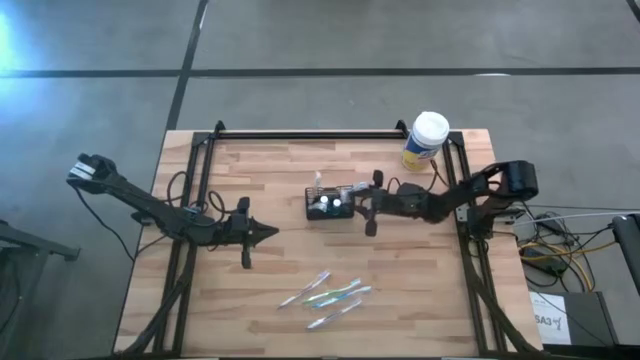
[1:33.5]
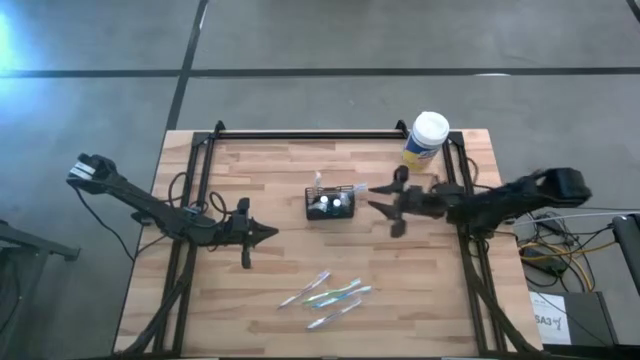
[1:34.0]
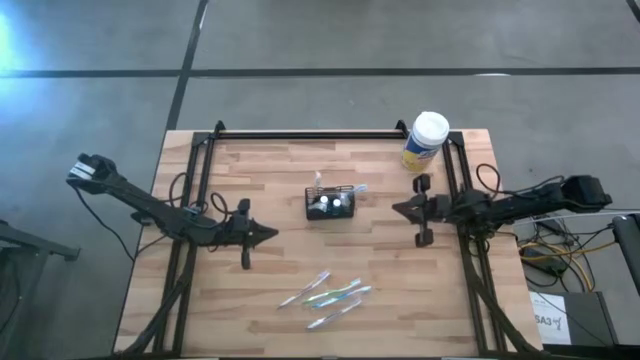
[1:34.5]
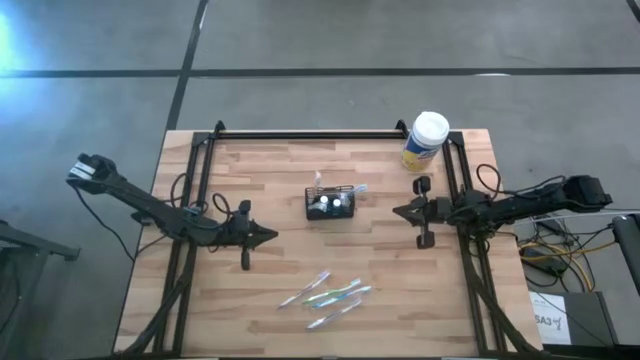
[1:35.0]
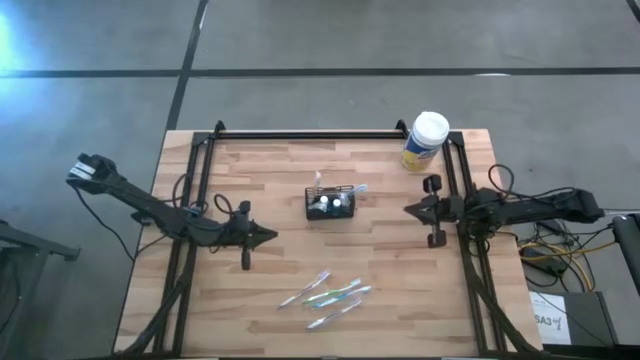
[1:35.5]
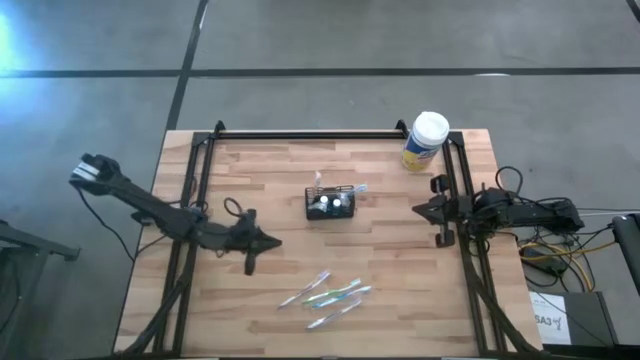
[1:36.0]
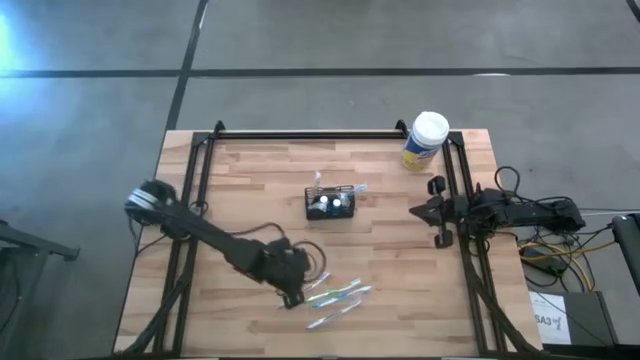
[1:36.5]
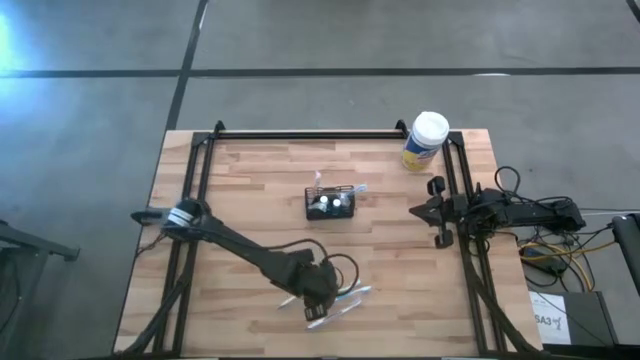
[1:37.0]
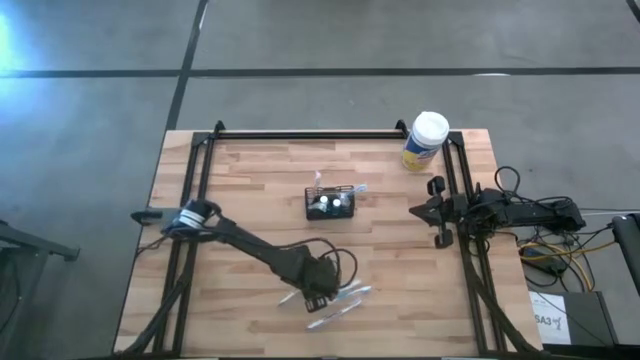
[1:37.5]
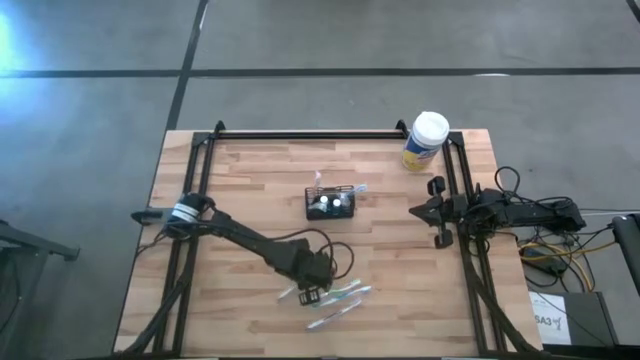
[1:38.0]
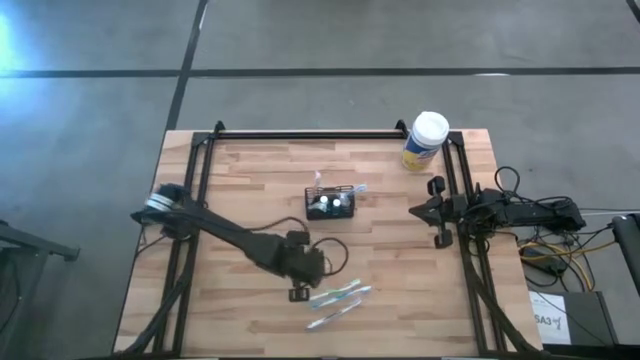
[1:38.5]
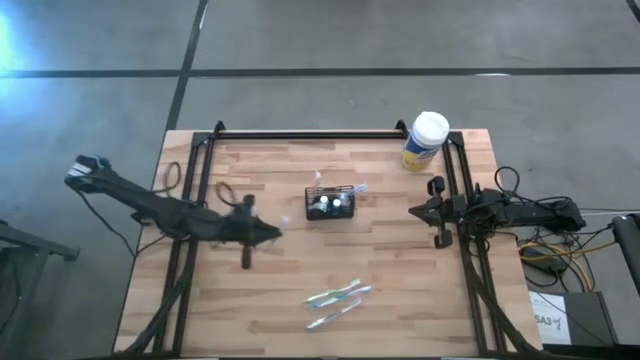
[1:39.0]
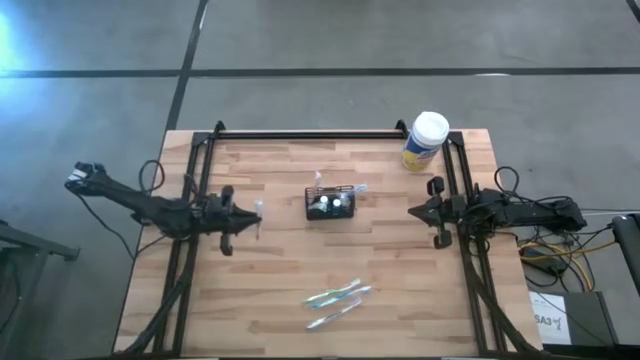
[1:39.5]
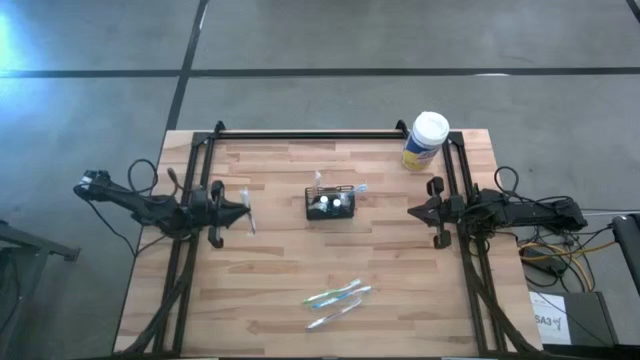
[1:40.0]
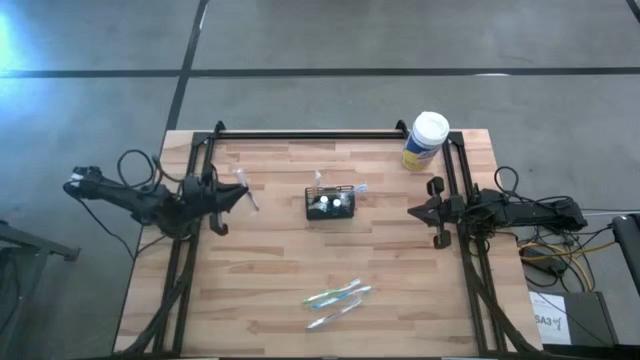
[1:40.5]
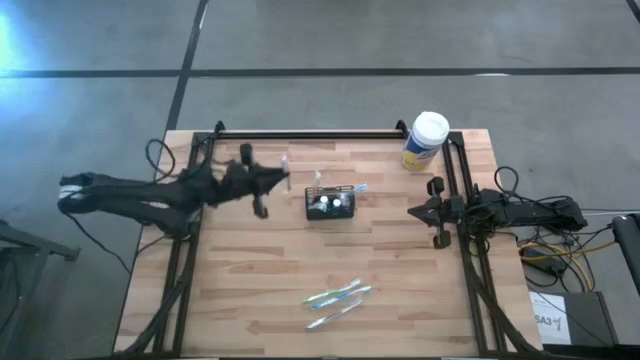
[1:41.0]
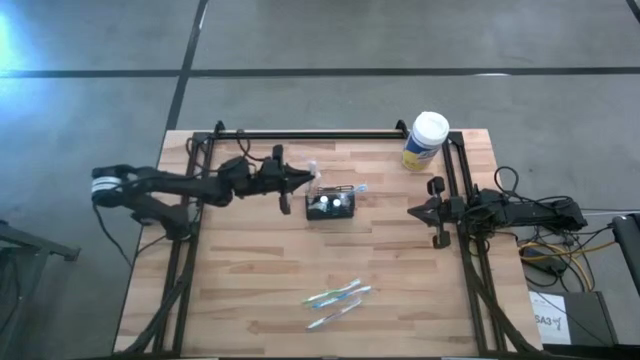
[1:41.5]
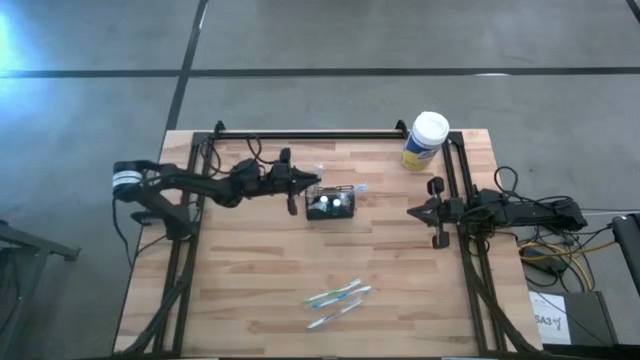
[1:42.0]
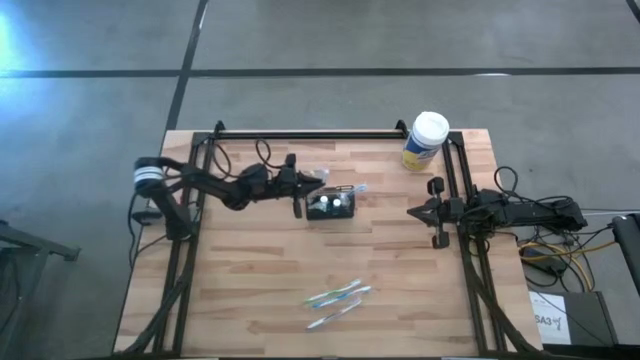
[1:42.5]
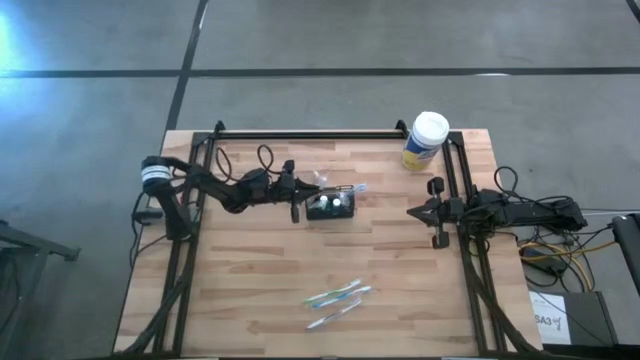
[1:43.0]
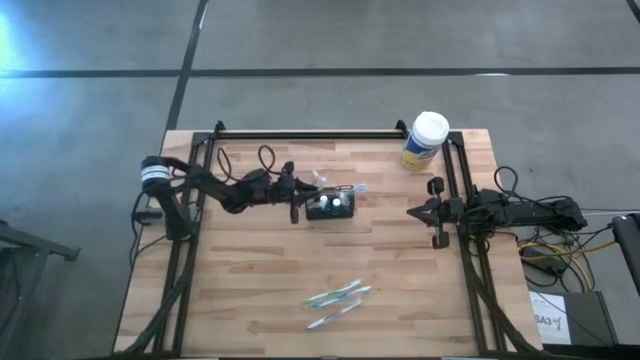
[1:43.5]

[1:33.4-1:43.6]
Task: Pick & Place toothbrushing station
Put the top violet toothbrush in the wire organizer

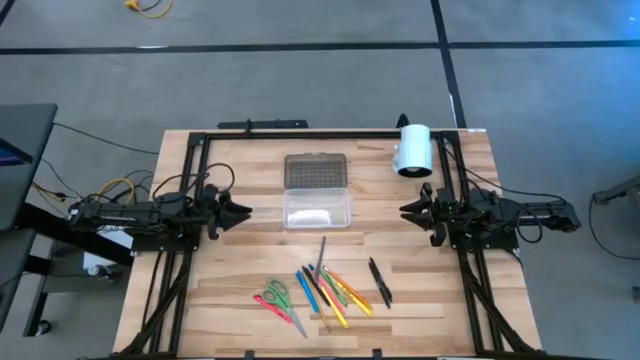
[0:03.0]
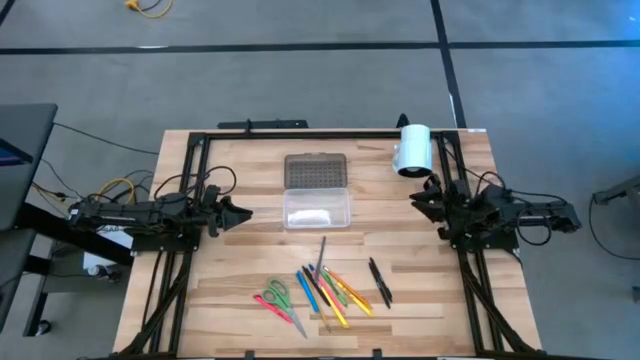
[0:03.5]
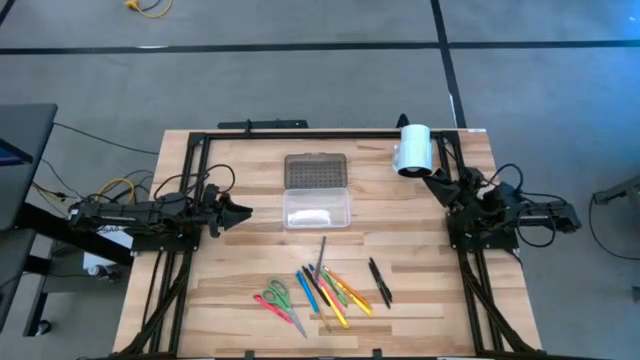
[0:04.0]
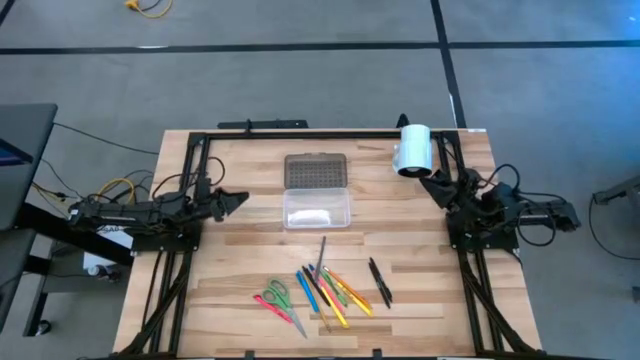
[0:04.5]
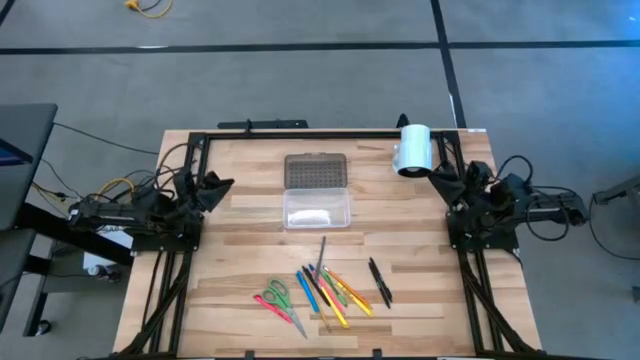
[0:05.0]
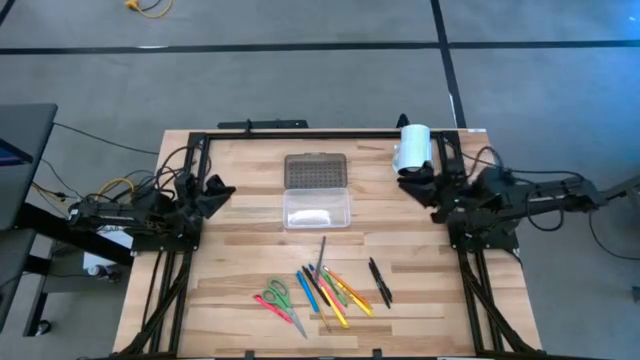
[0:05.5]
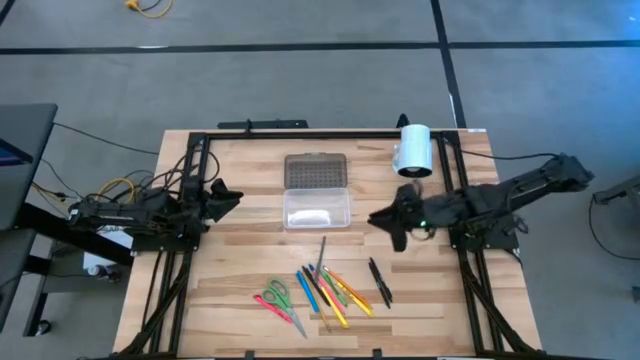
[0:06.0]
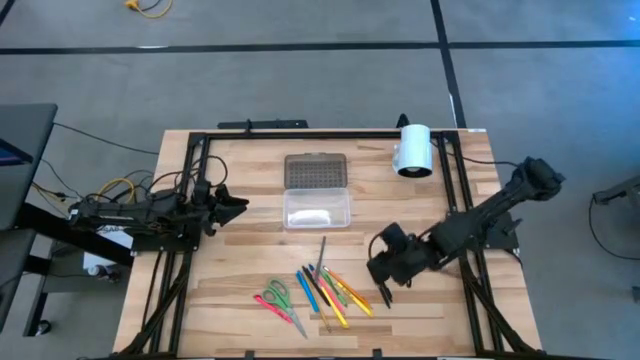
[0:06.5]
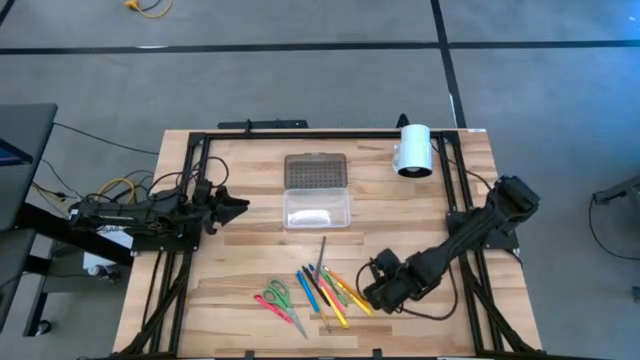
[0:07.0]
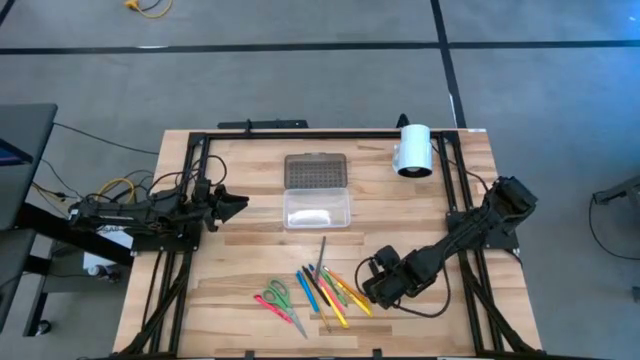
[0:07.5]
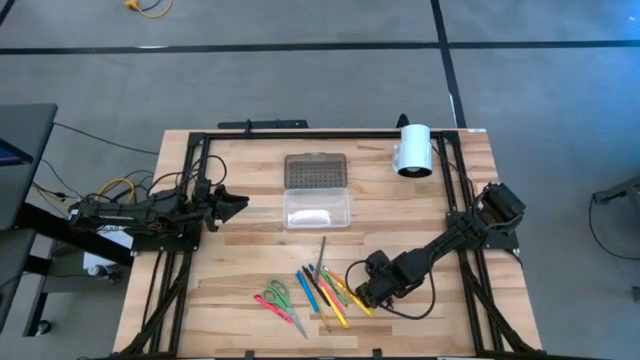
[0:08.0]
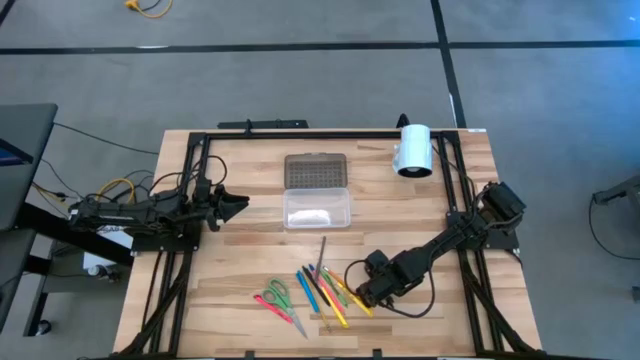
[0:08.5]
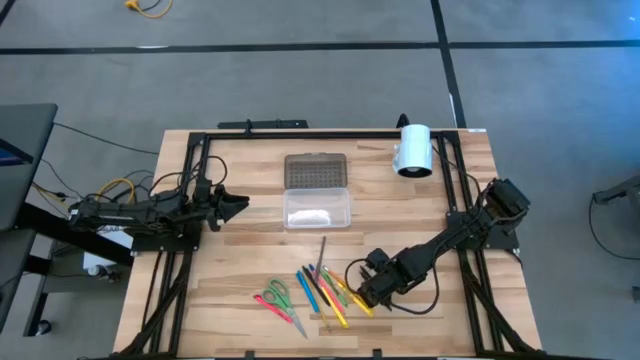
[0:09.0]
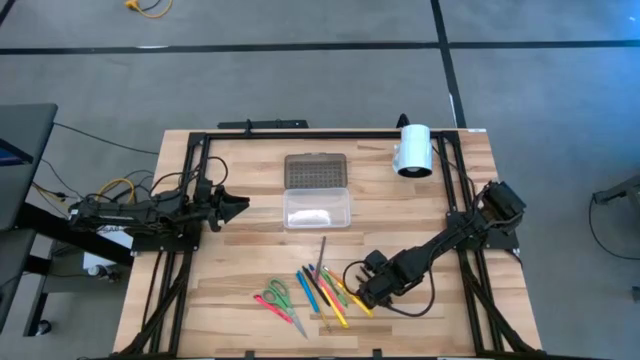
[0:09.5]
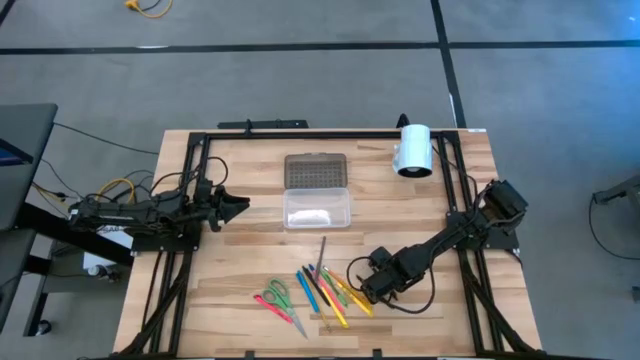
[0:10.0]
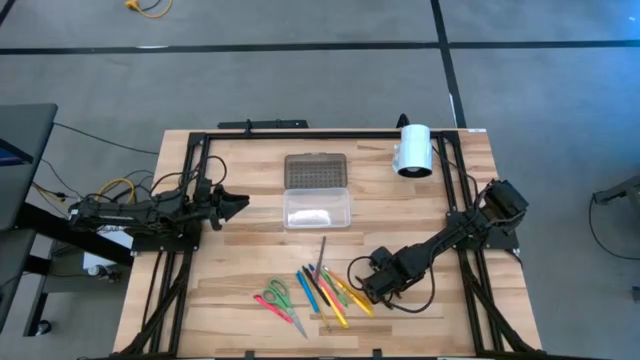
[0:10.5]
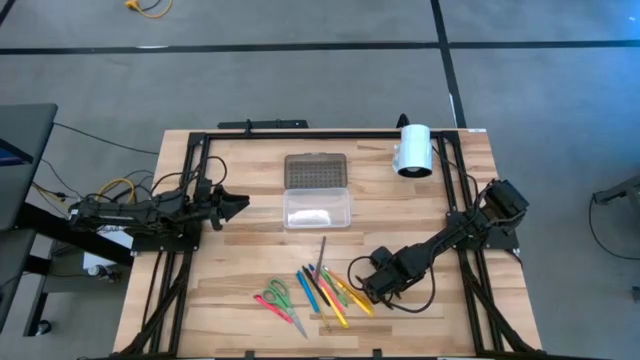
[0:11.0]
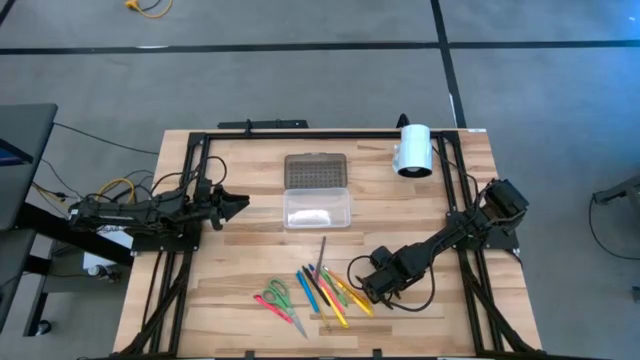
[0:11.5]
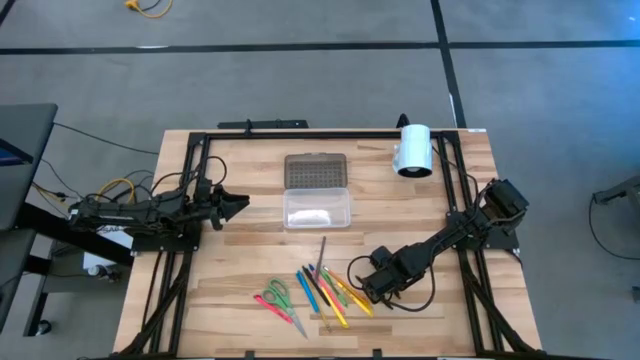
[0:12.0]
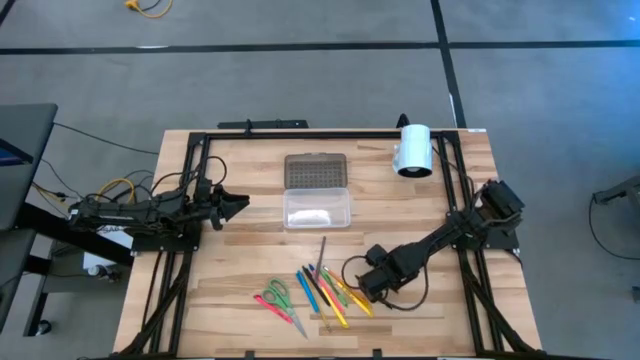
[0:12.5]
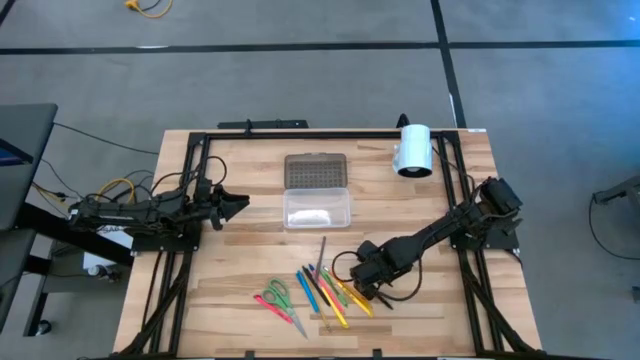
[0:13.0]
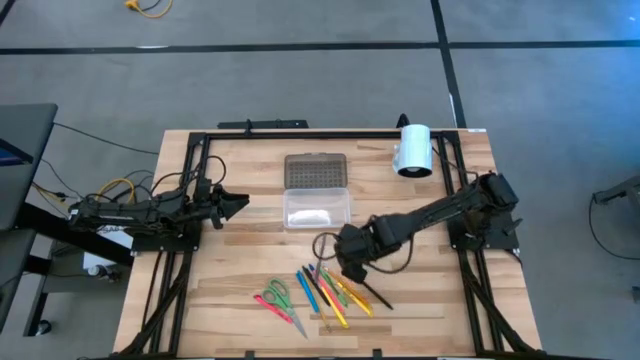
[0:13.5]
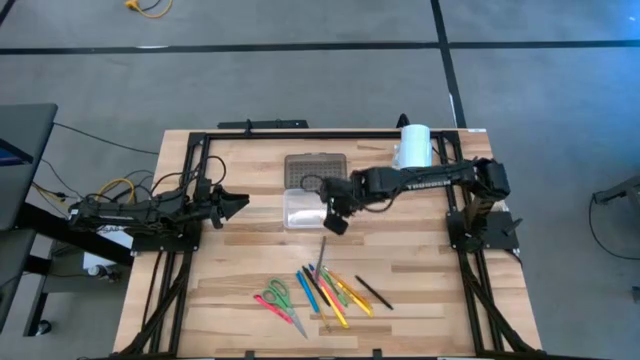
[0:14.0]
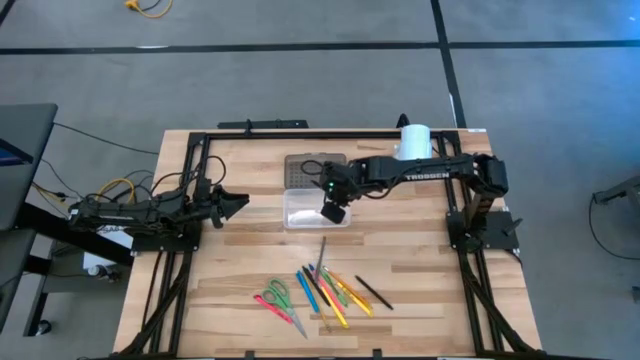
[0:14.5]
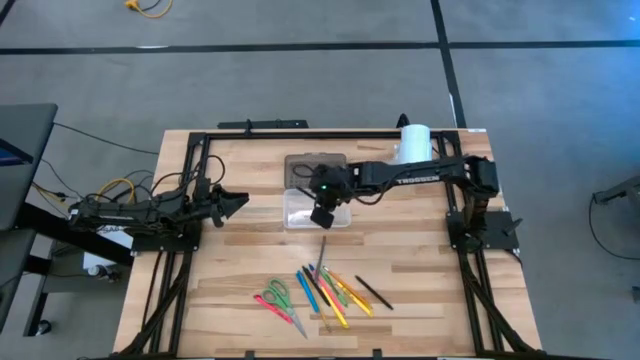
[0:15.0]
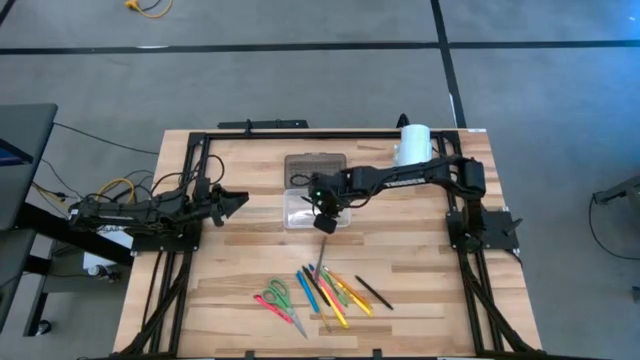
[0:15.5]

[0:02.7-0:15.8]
Task: Pick & place school supplies into a supply box
Put the black pen into the supply box
